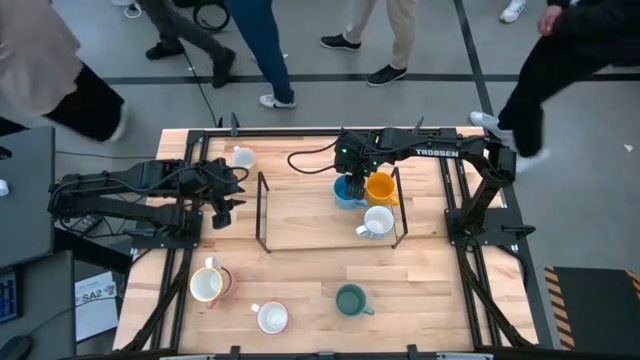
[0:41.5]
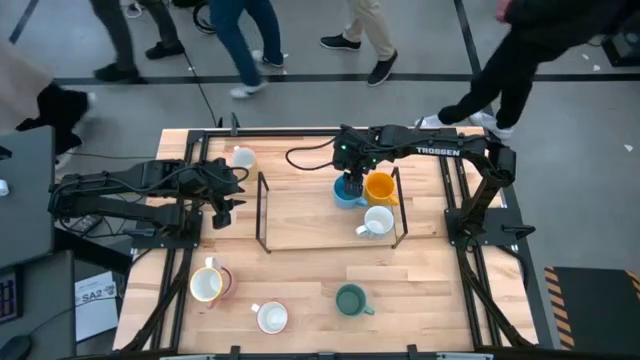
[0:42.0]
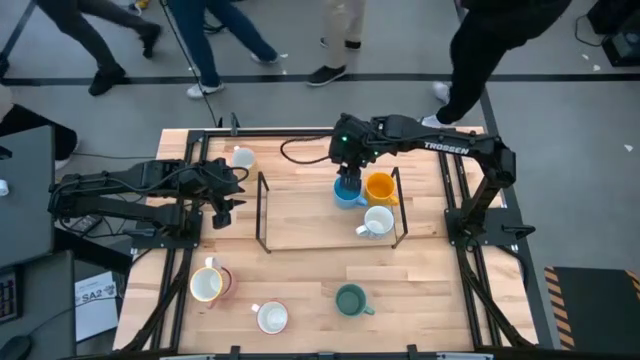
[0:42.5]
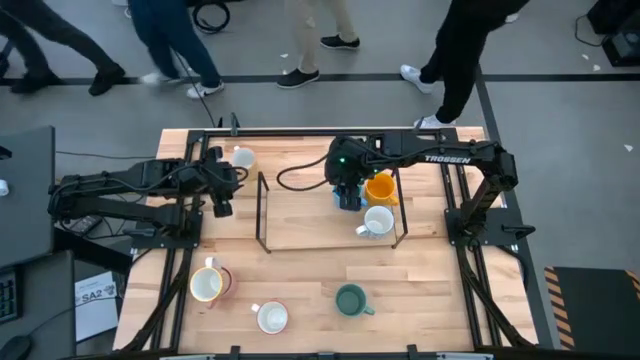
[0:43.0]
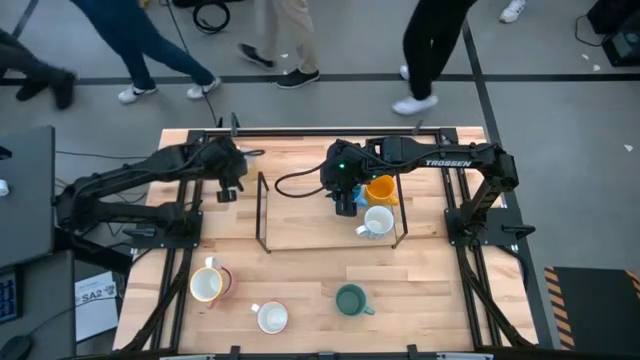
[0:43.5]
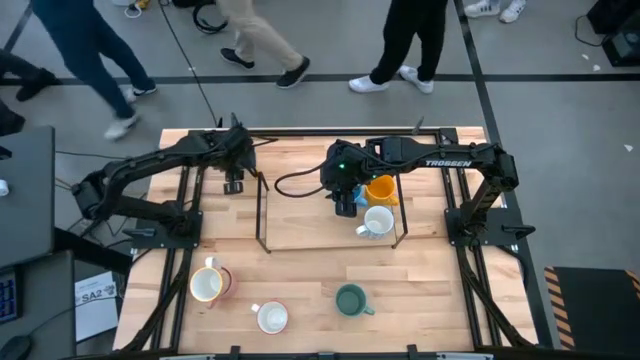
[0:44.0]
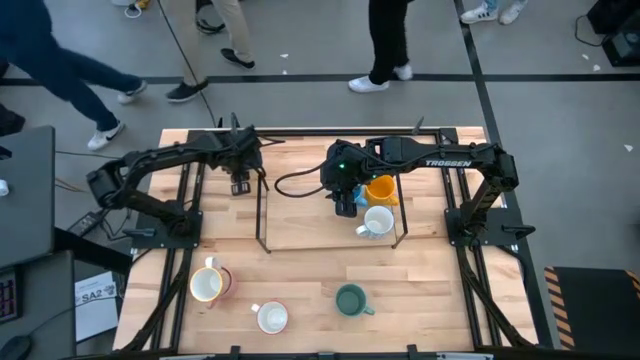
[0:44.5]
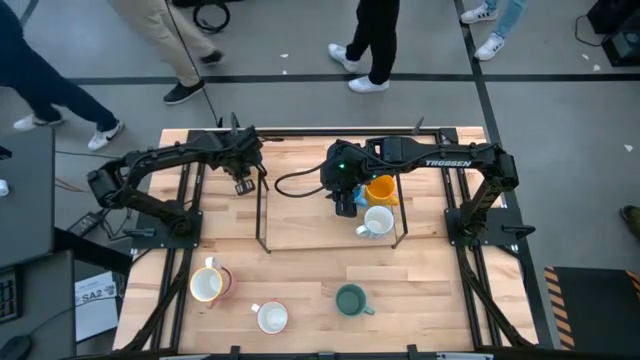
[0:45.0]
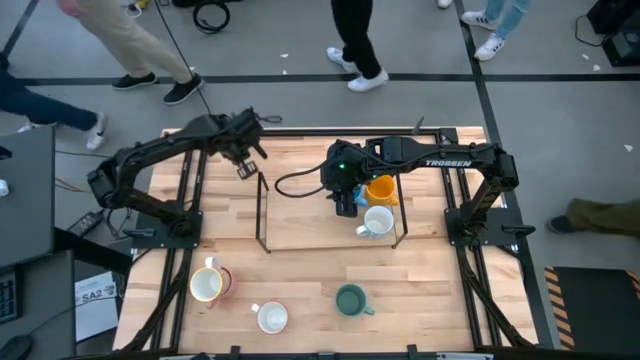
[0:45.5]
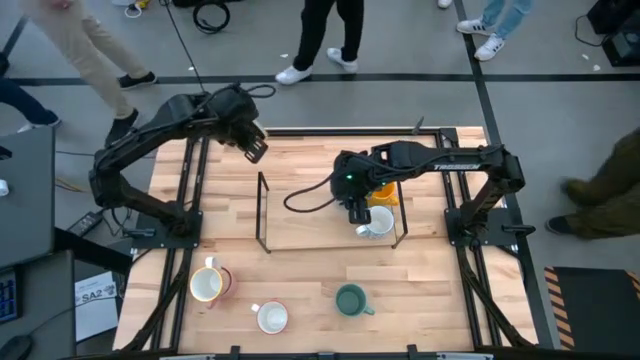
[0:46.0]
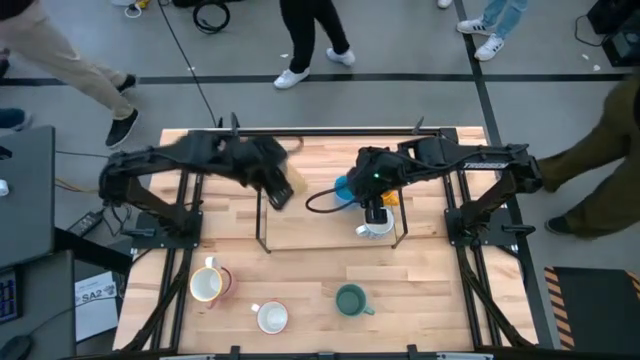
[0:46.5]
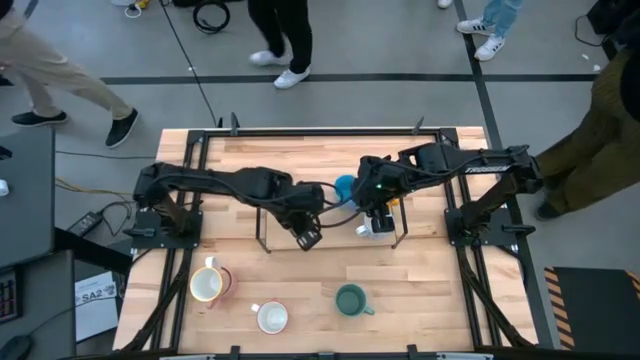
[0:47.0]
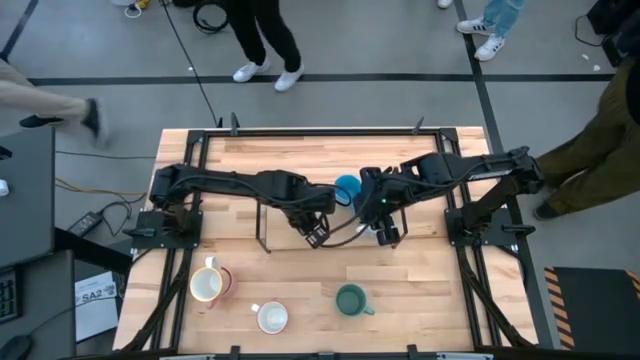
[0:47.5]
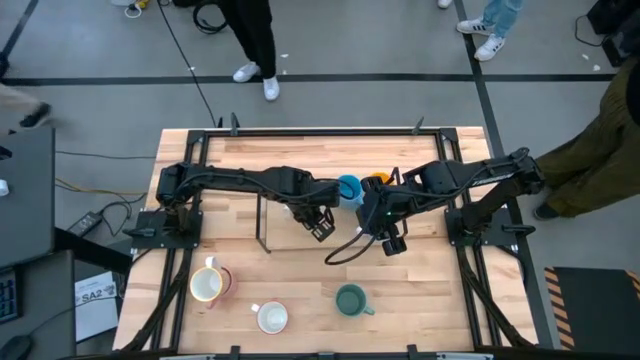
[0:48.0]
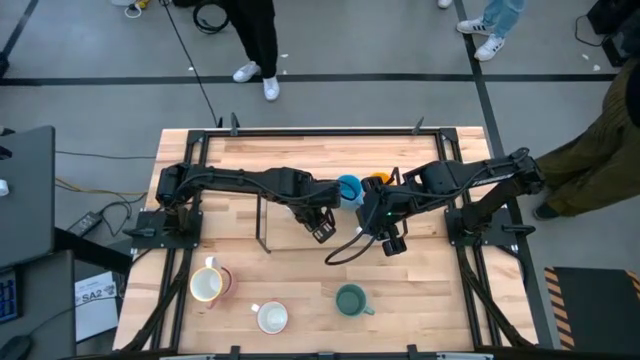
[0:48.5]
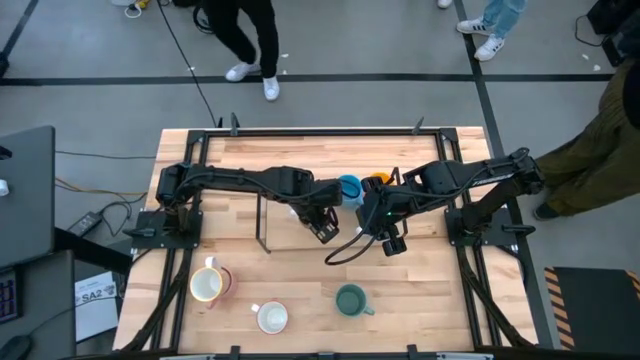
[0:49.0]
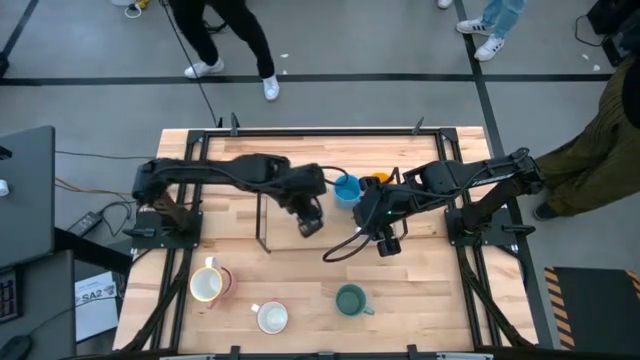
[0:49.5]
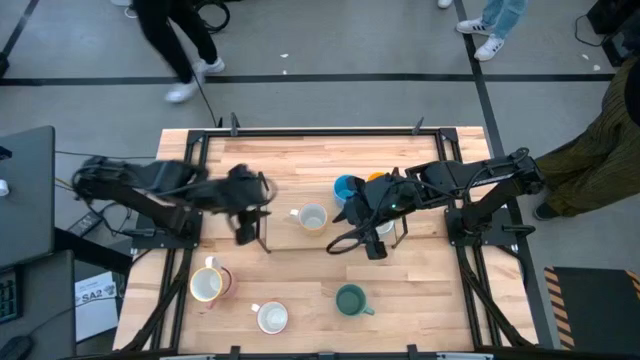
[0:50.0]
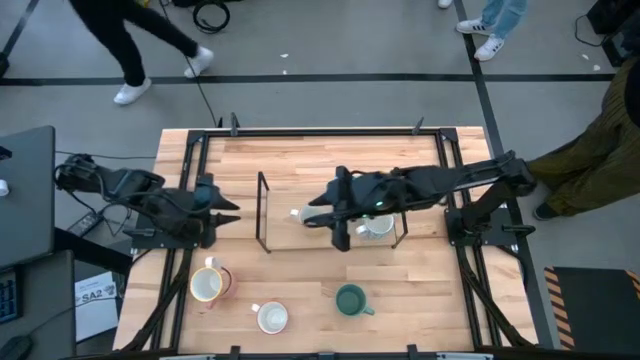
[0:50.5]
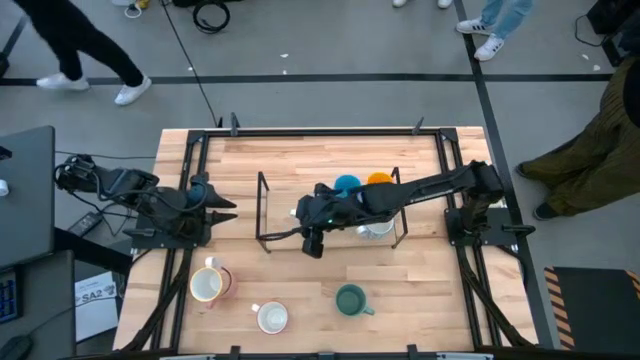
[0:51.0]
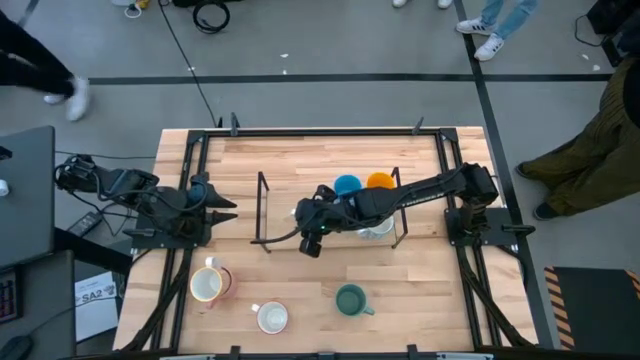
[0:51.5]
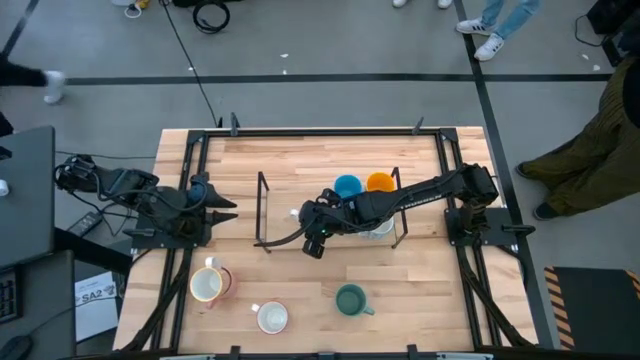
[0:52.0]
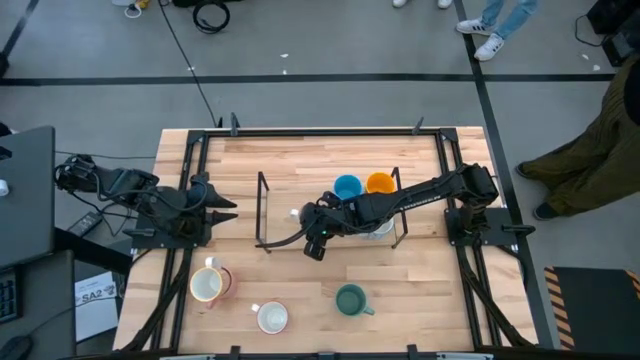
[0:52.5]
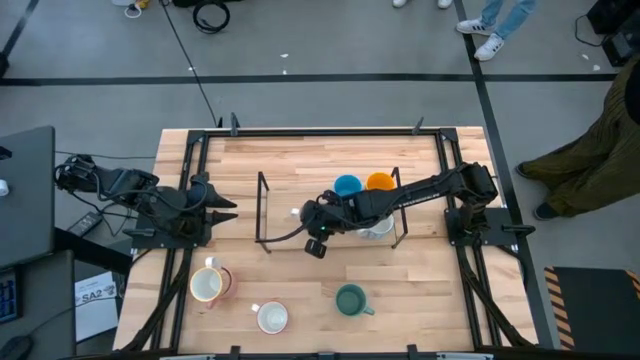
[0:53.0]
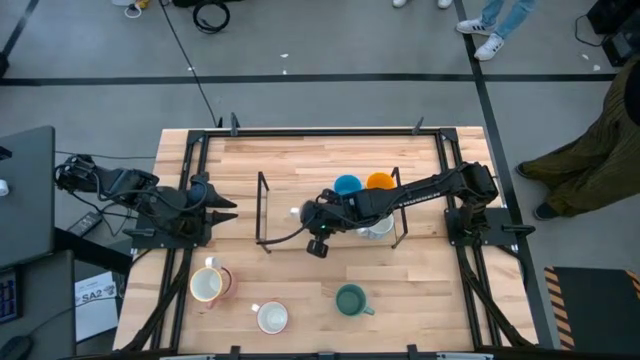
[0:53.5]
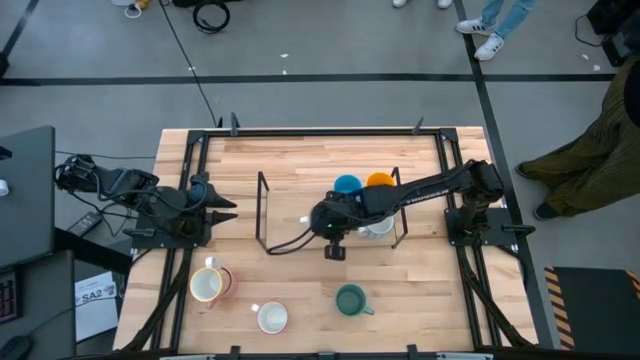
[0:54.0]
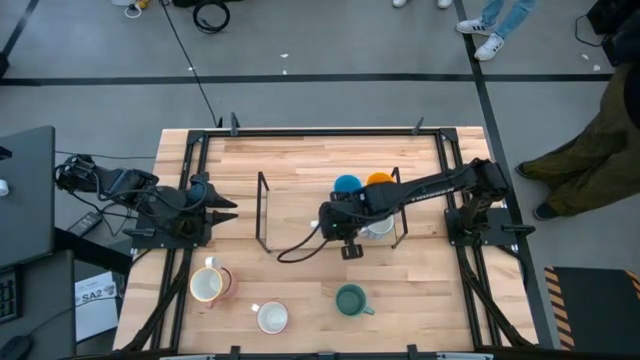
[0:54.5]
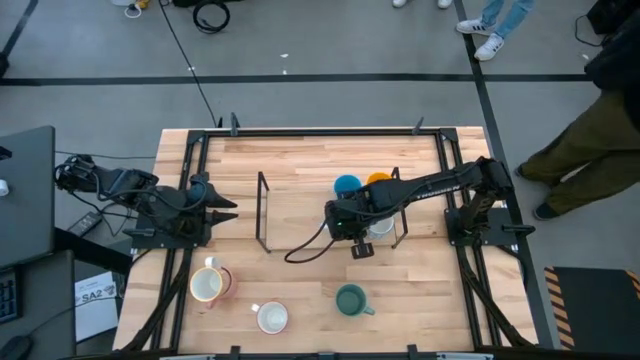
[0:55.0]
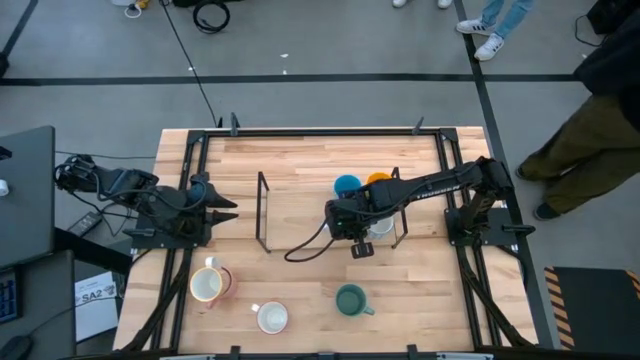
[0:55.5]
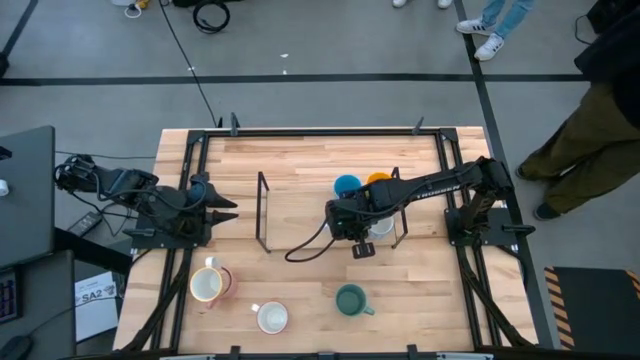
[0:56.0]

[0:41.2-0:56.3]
Task: Place coffee mugs
Put the yellow white mug on the shelf

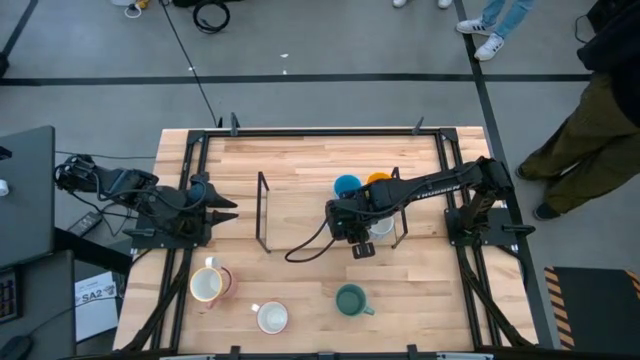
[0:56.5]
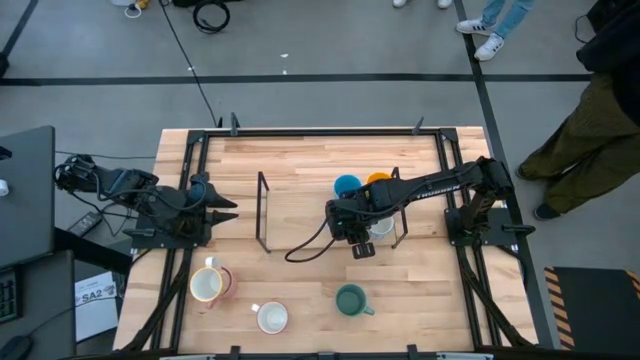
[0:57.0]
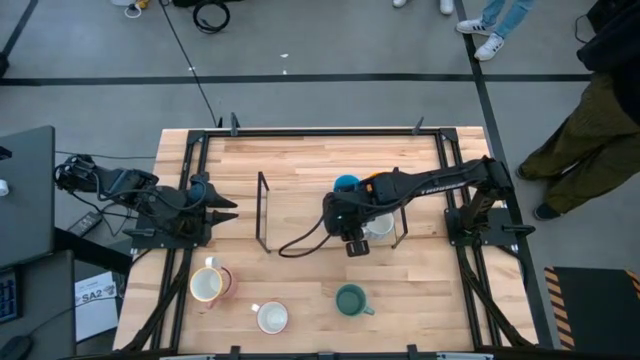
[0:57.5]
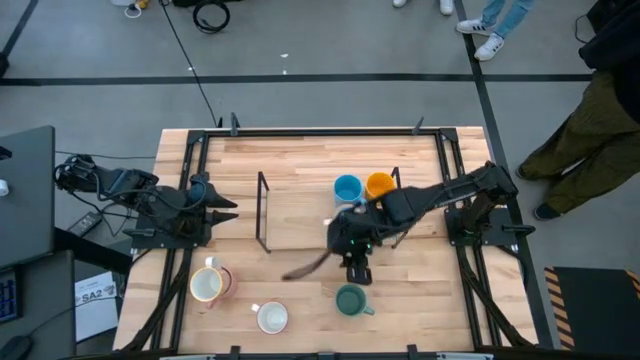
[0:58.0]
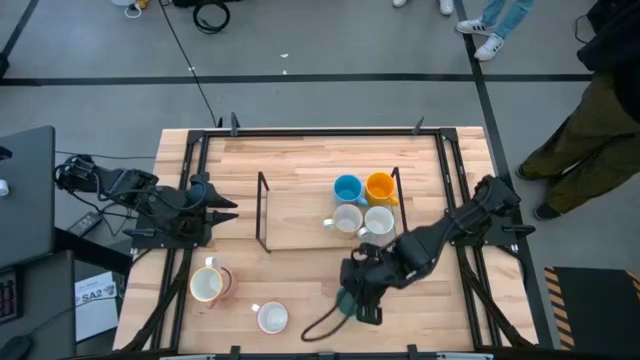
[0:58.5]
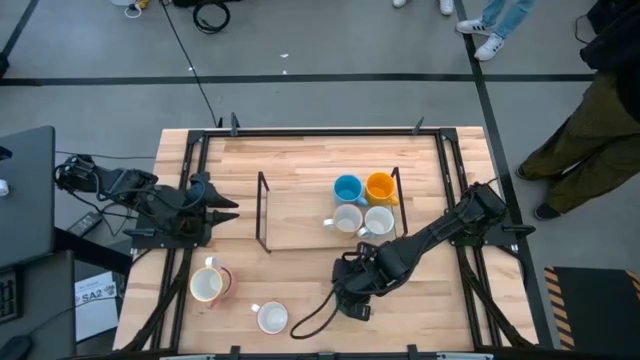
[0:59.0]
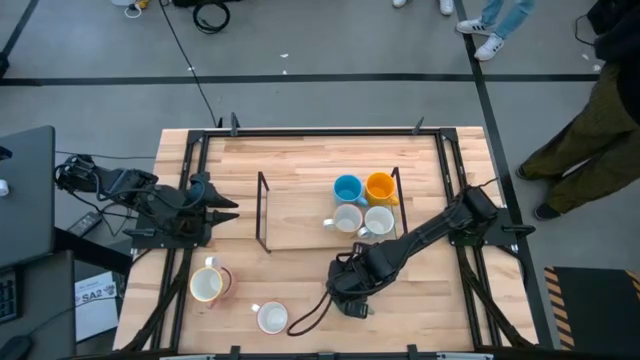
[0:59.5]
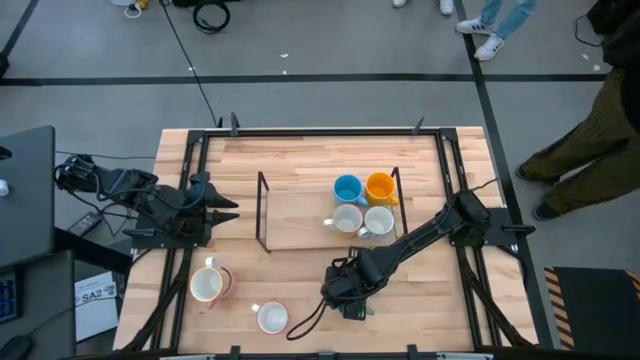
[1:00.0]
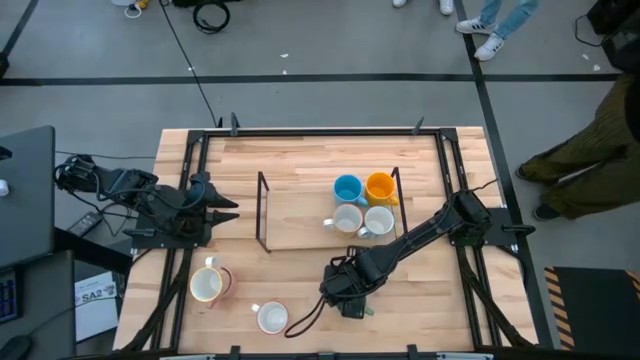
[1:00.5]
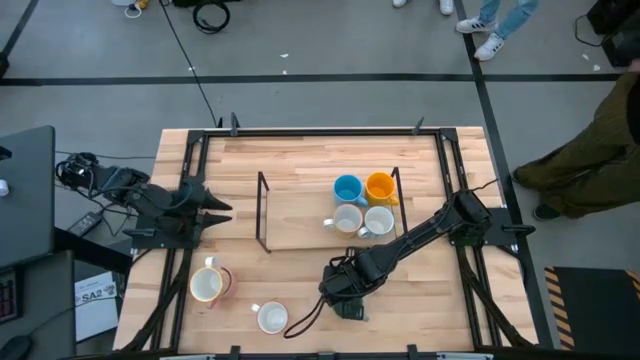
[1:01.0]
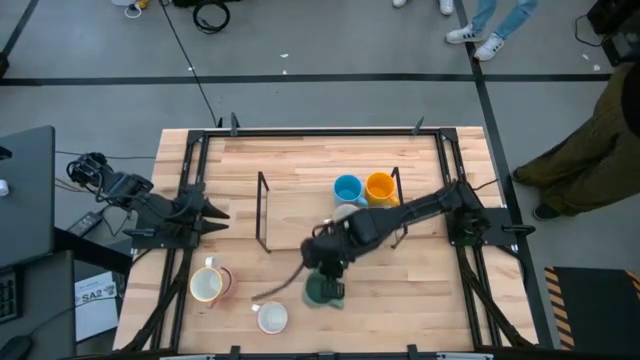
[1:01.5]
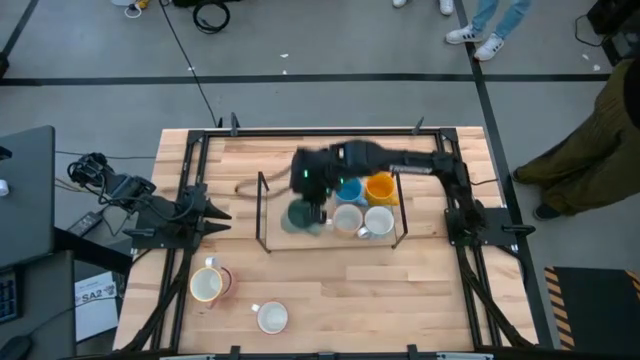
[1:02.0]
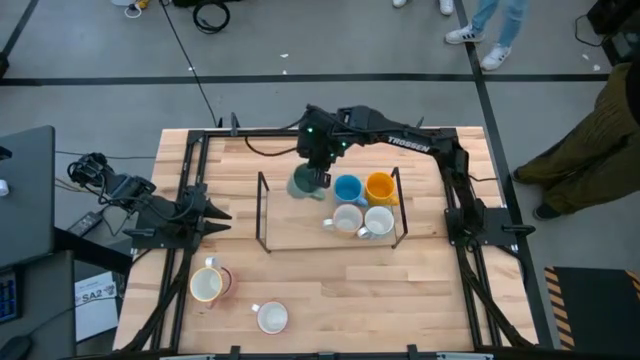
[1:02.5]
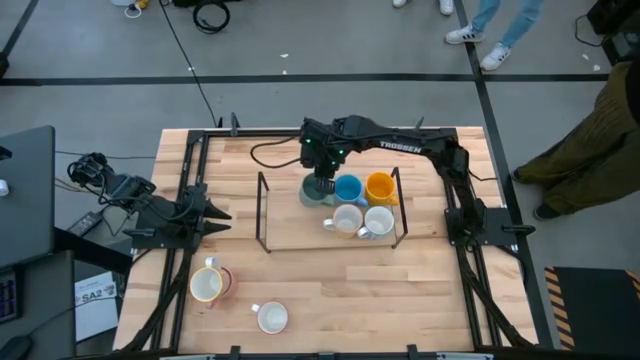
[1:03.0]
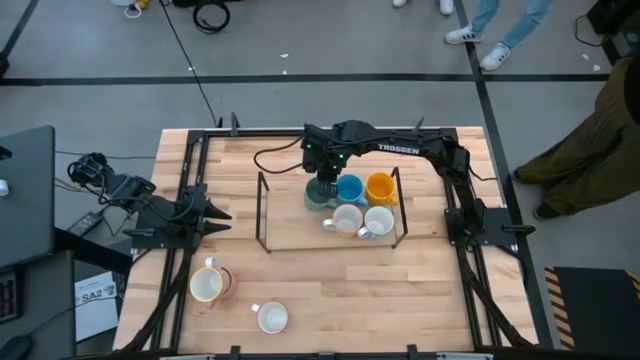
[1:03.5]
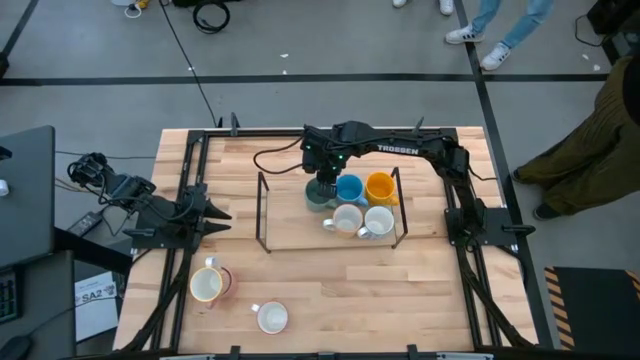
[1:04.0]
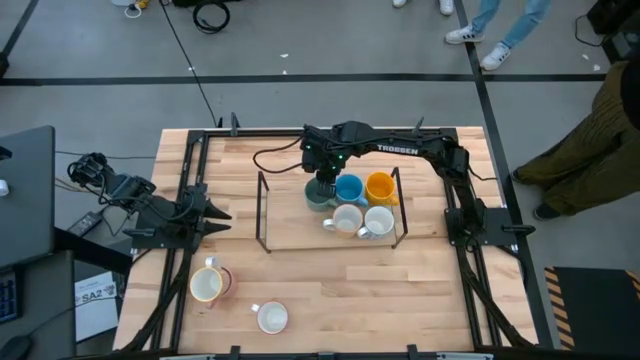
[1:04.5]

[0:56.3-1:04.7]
Put the green mug on the shelf
